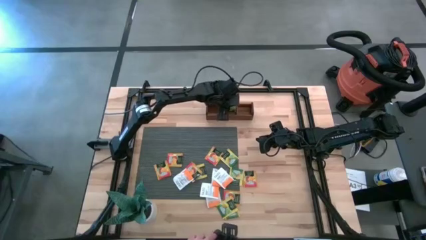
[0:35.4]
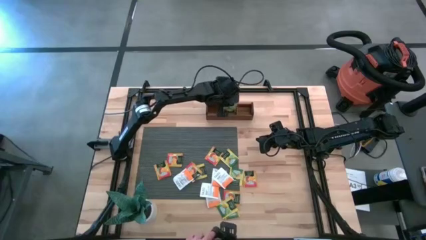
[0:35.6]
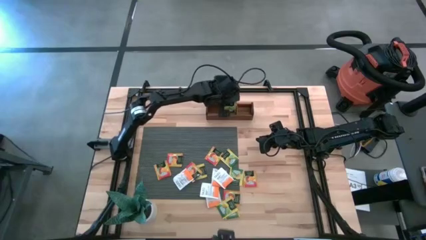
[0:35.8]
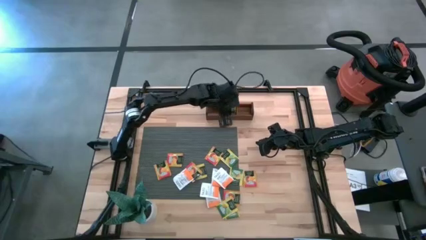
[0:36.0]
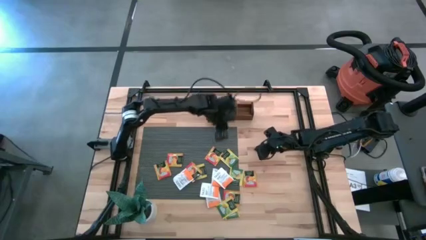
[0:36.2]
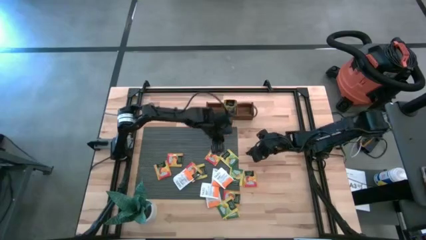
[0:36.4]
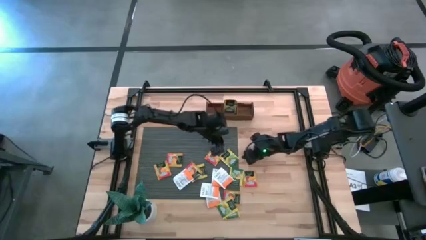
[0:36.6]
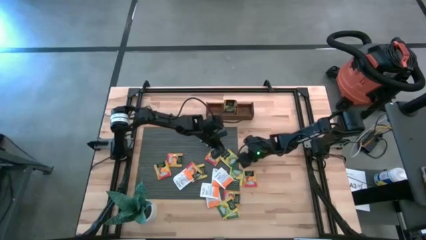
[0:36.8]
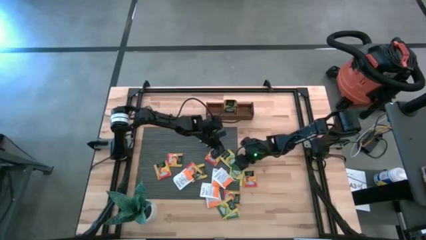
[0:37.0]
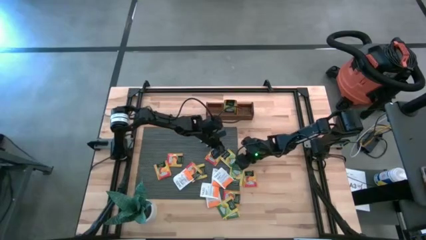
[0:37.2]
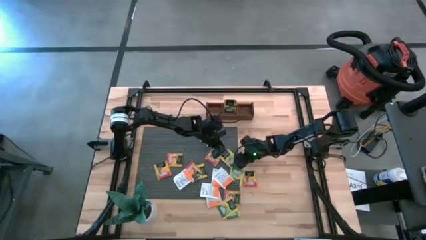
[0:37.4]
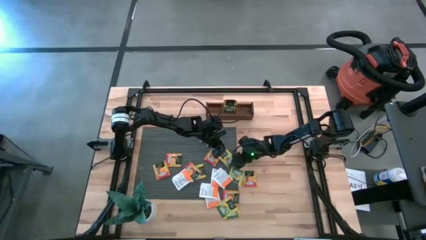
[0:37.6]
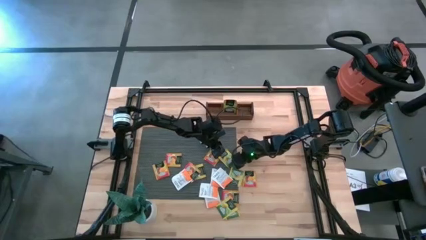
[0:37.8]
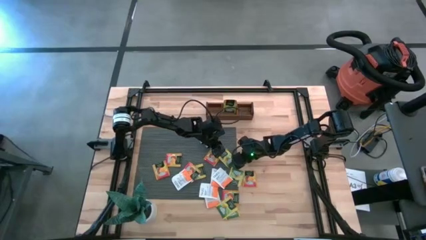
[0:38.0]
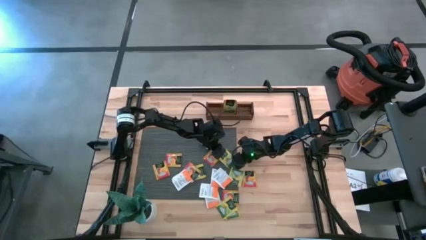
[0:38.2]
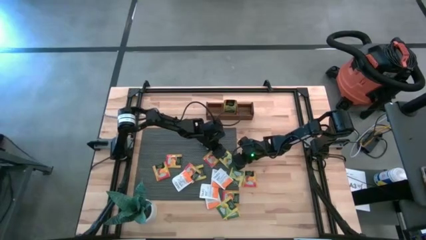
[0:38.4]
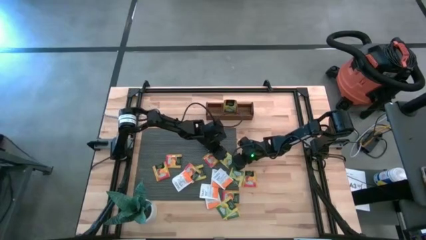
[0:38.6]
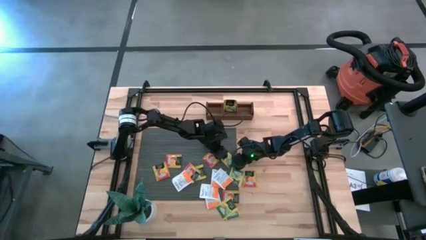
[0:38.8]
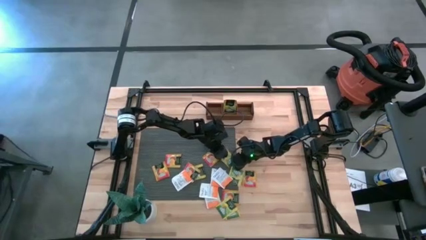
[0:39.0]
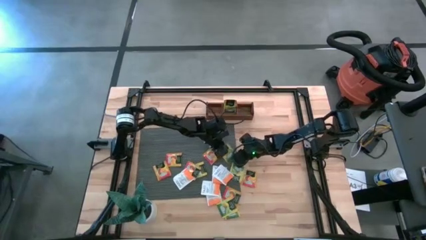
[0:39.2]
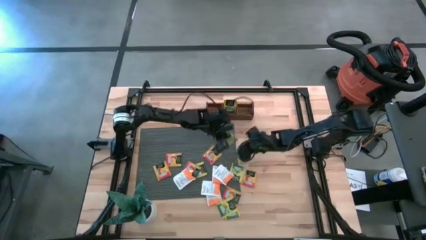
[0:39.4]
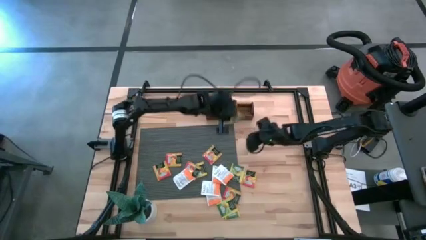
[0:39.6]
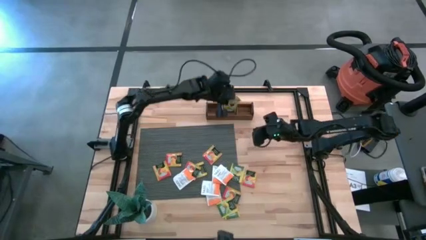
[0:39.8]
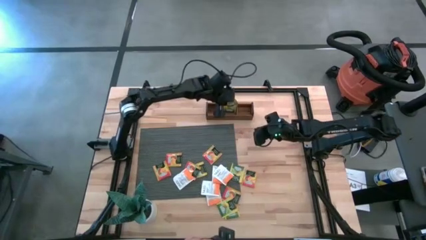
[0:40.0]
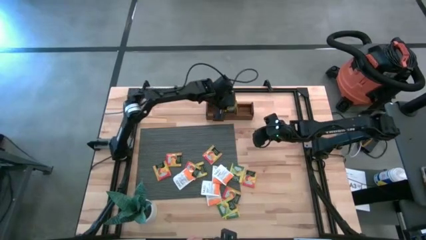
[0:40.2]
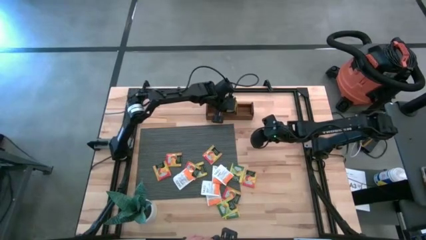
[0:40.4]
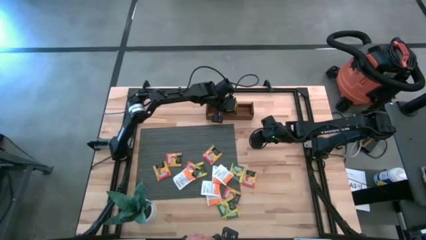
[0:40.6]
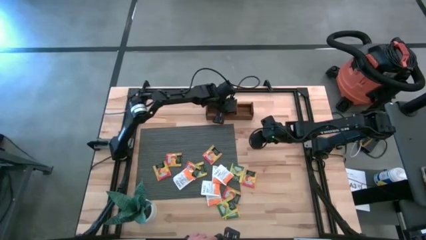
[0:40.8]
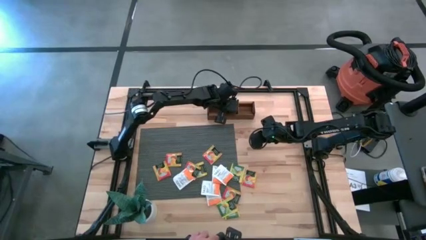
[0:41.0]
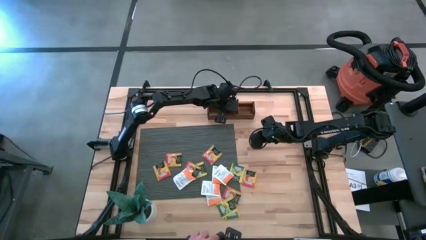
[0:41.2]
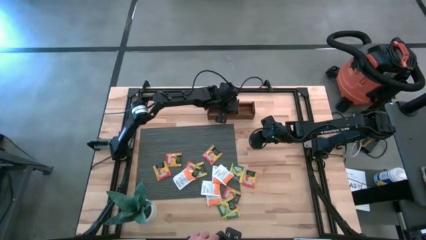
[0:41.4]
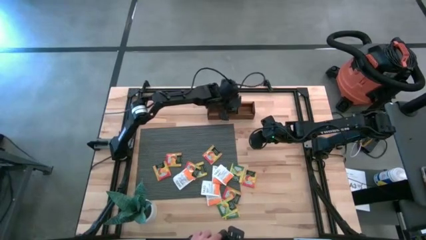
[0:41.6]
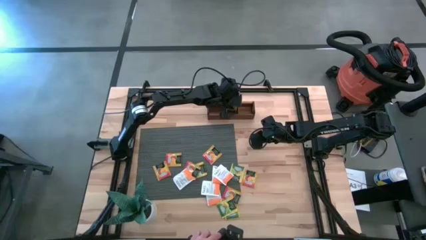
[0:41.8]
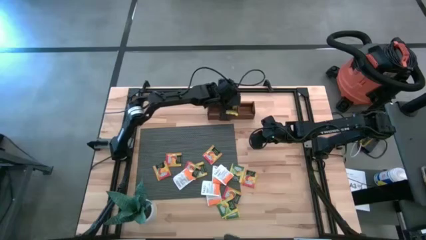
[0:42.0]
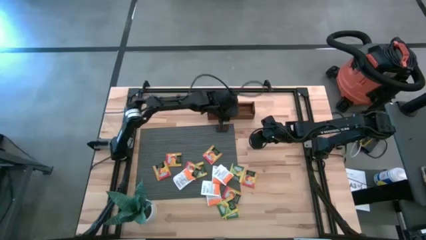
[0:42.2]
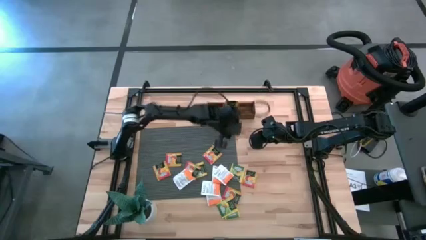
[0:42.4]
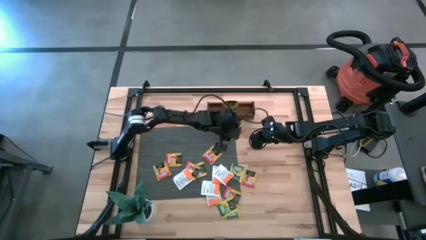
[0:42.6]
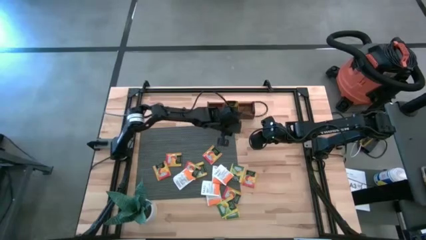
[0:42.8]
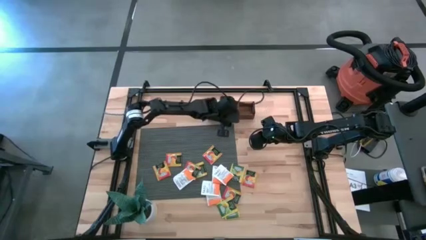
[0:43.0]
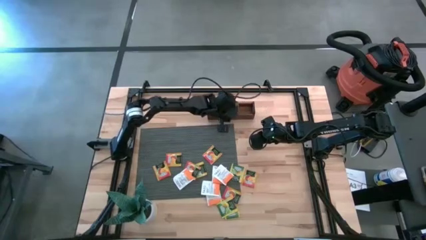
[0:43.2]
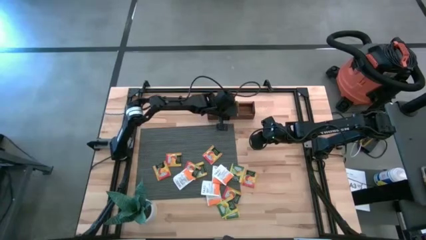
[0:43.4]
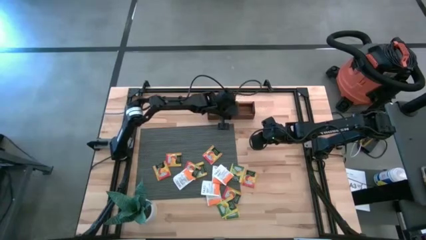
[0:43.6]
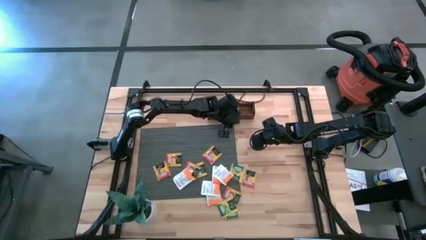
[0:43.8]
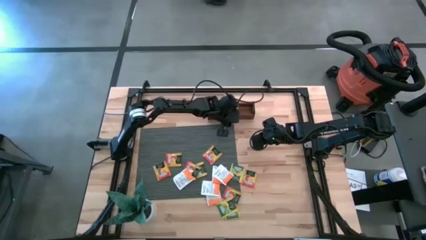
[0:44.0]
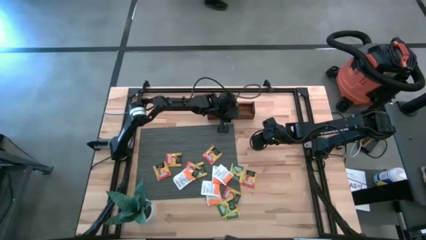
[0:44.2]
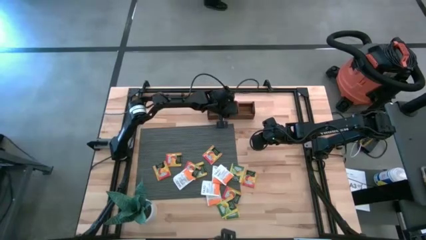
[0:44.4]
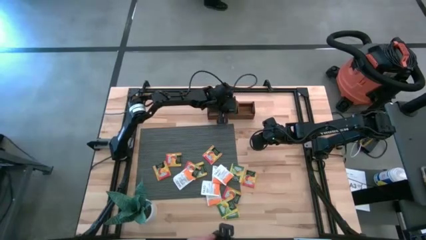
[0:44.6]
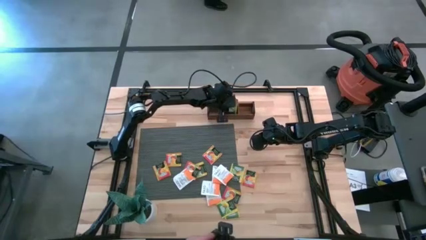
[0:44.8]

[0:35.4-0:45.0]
Task: Pick & Place Tea
Put the yellow tea bag into the middle section of the wooden organizer
